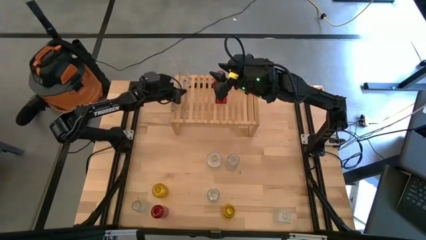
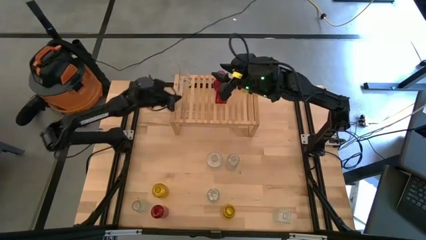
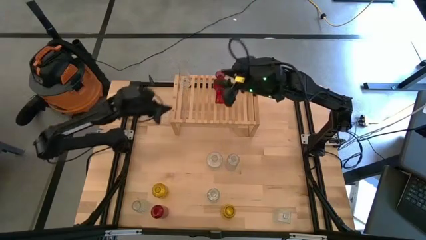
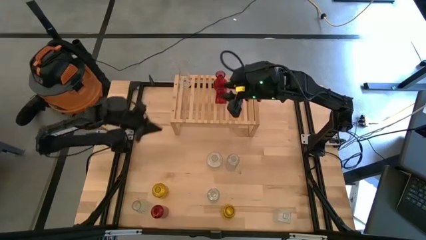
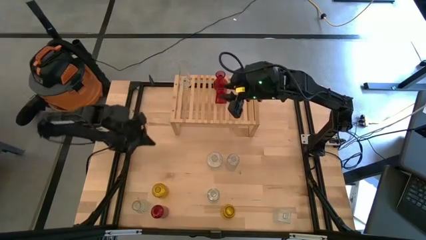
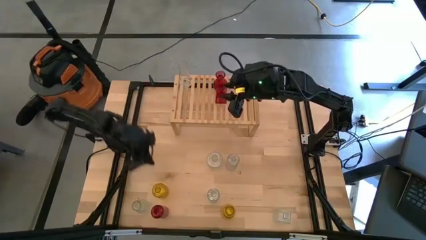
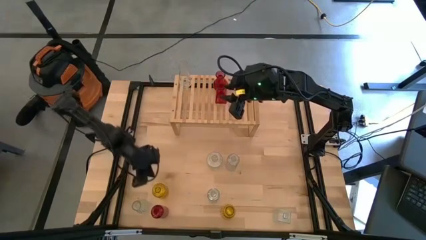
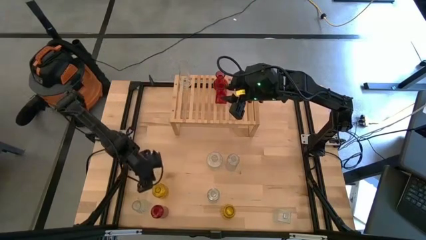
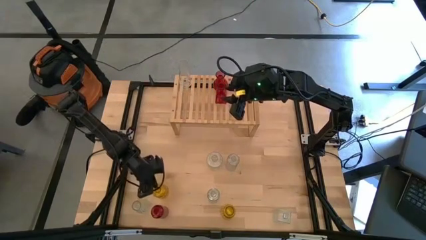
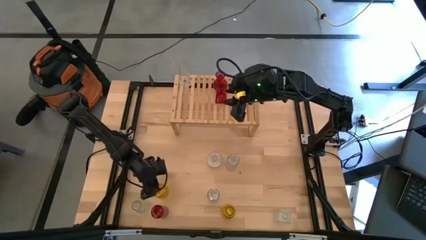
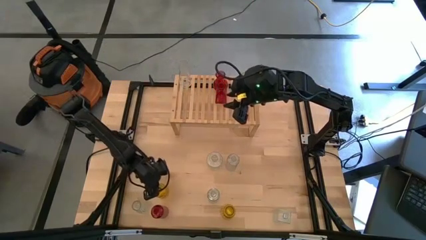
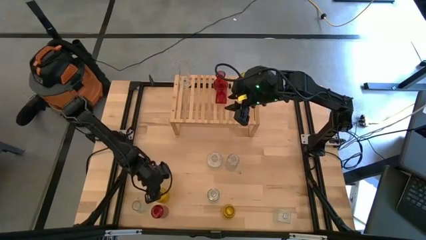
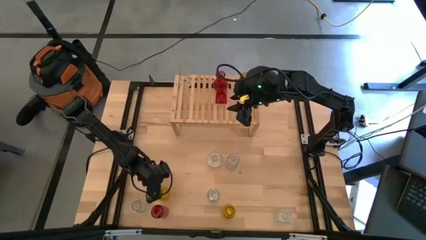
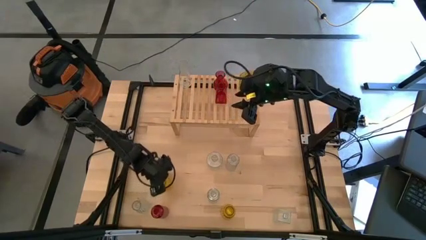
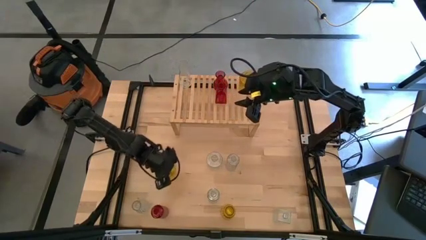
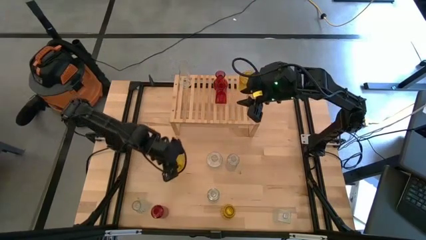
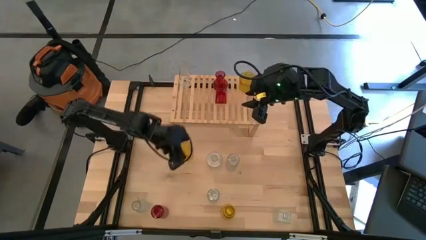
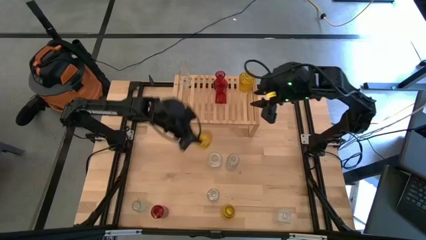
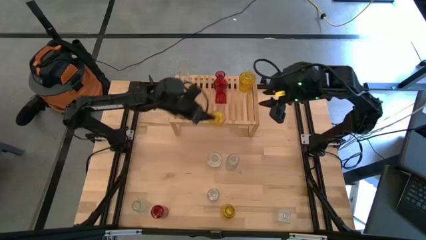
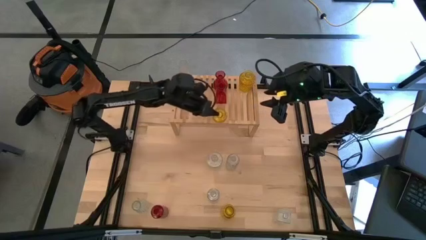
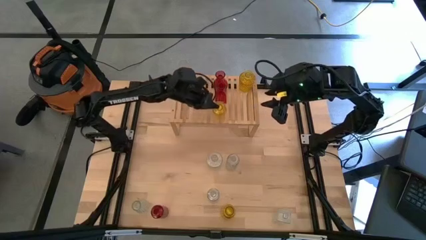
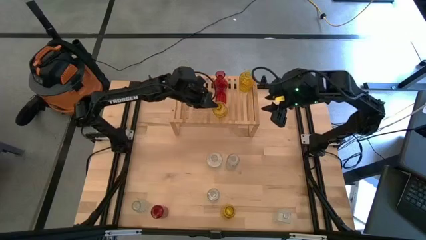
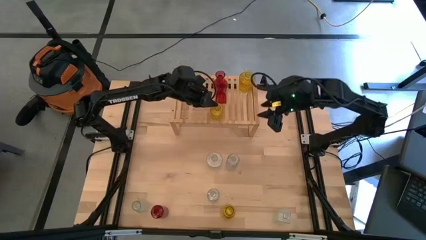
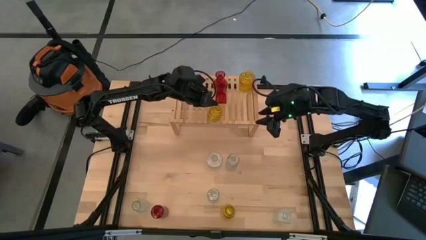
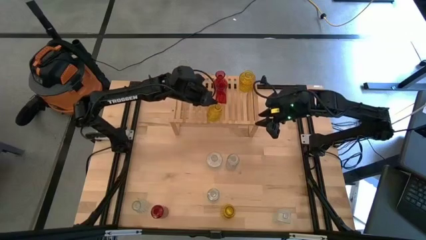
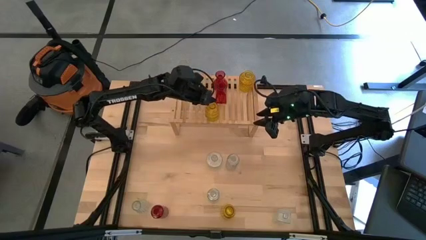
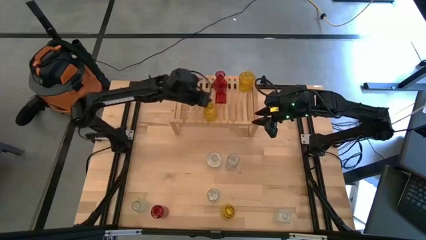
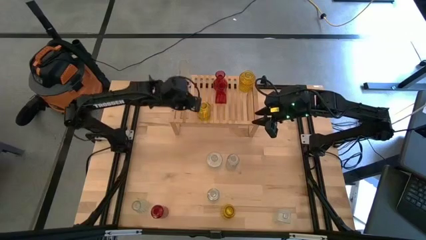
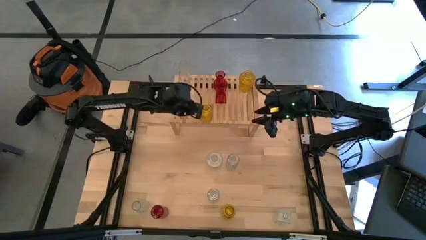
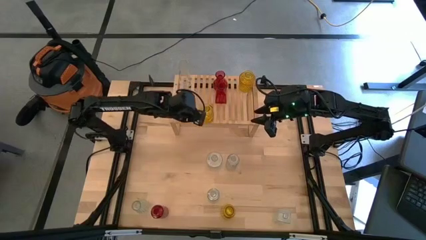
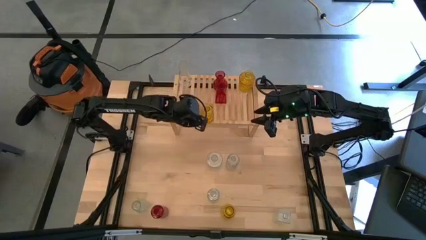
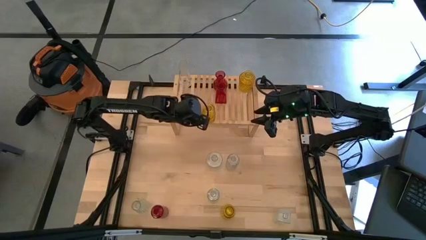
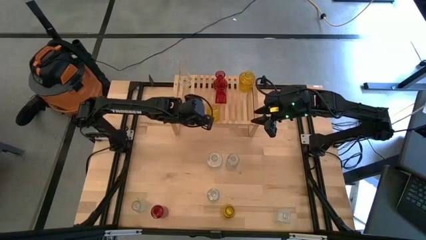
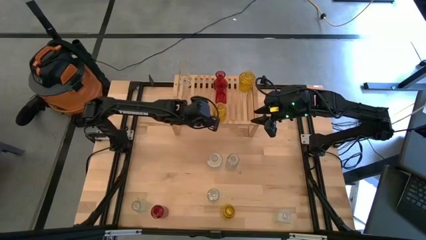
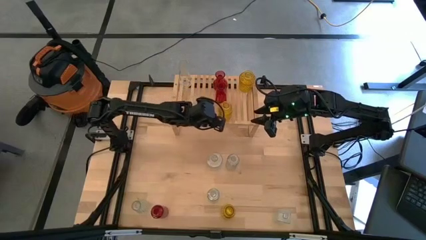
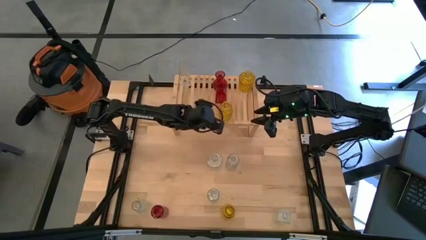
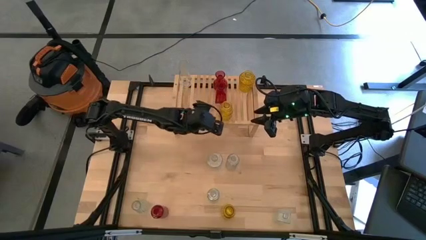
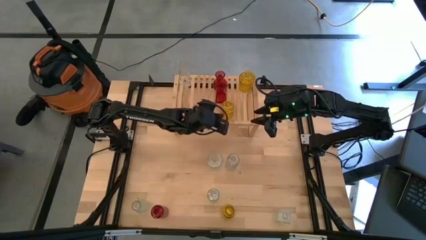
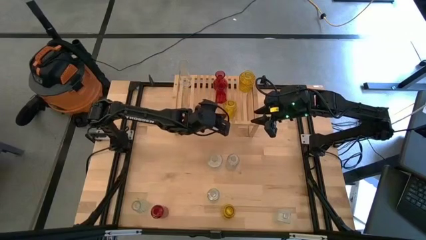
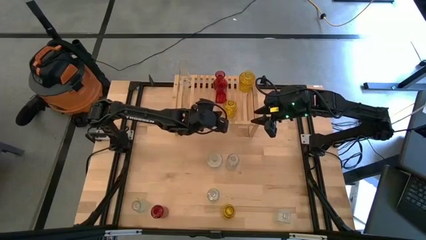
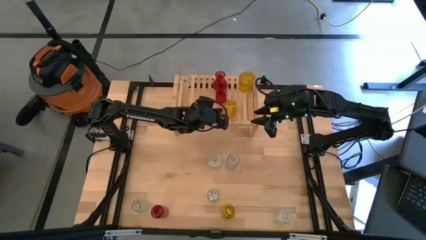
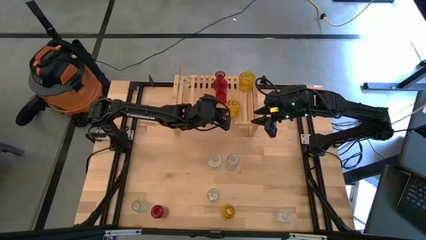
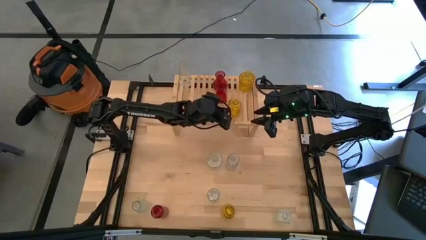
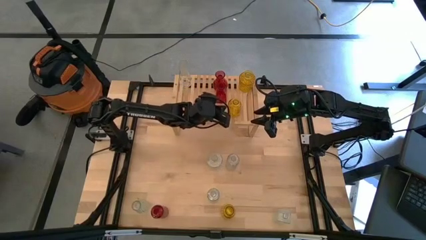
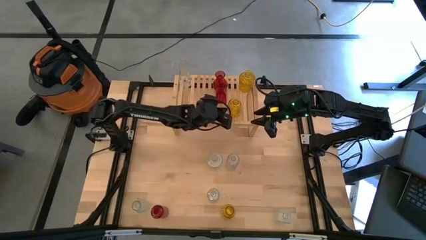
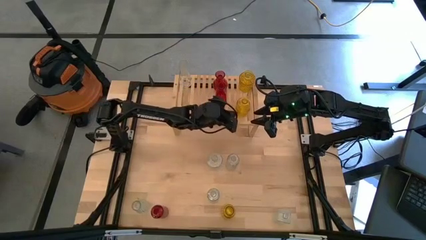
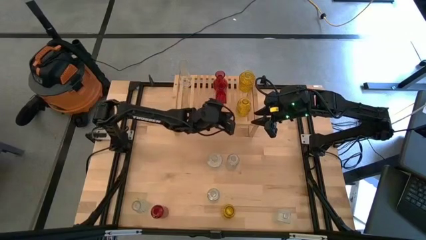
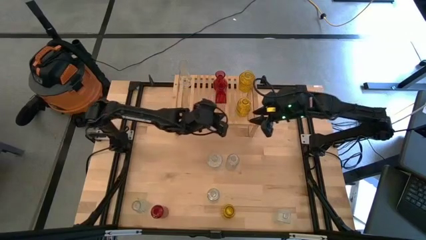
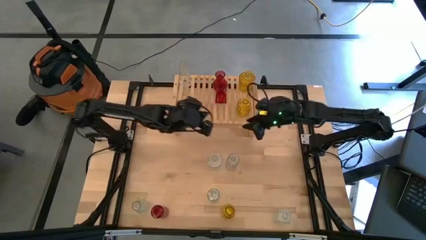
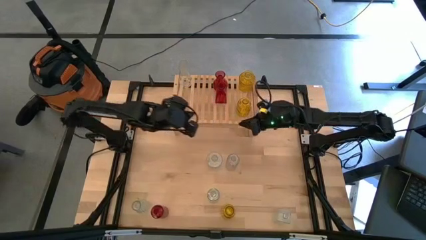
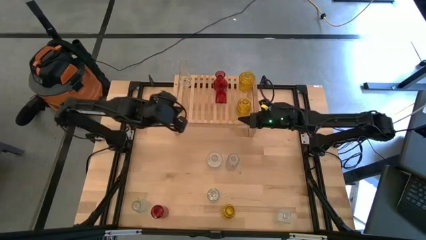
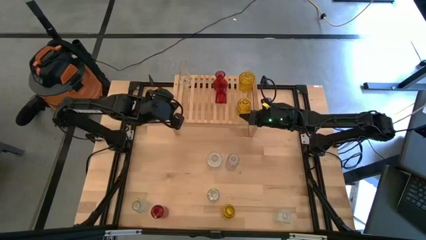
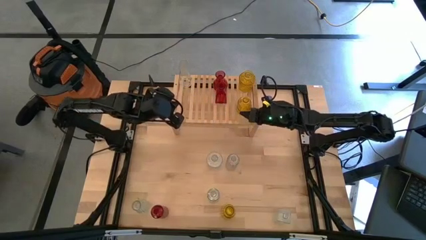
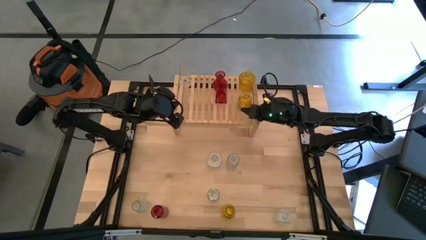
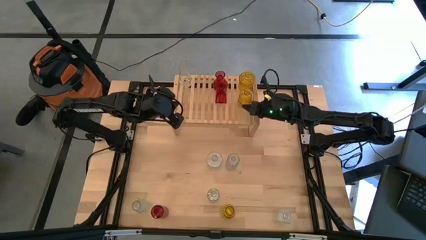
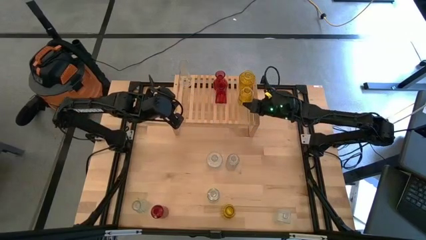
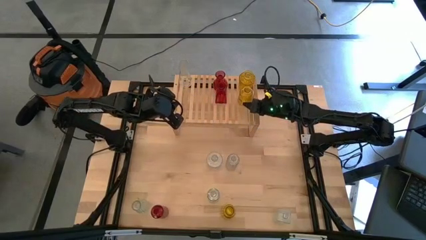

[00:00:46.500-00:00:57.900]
Task: sort vases onto shelf
Put the yellow vase on the shelf align with the other yellow vase

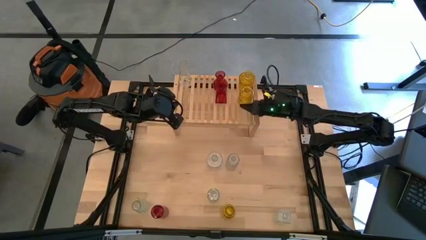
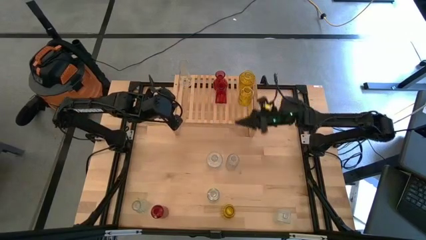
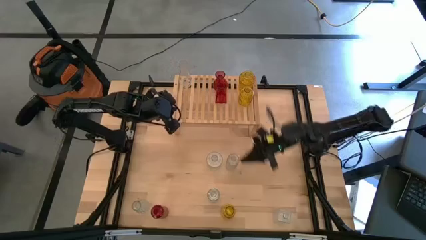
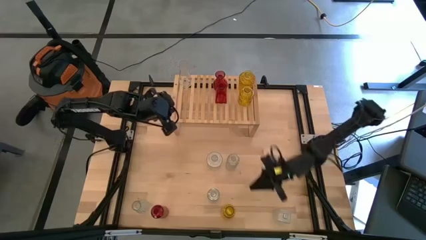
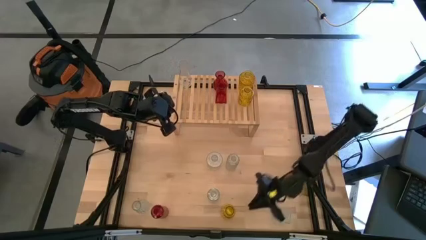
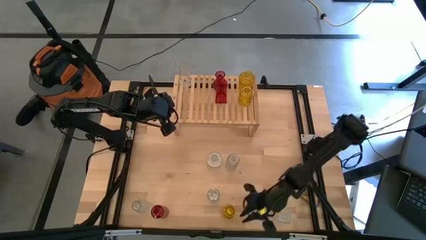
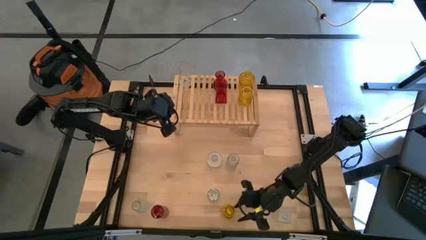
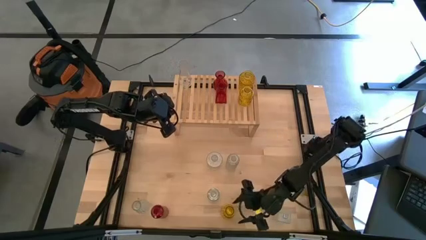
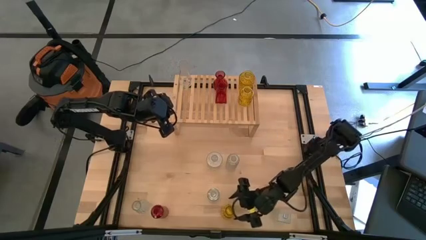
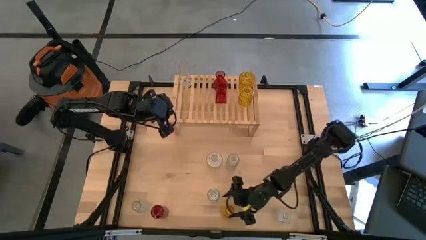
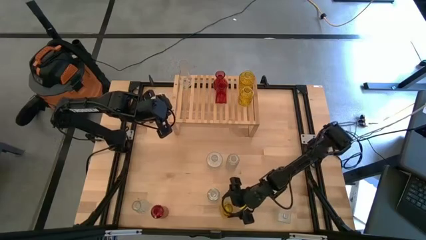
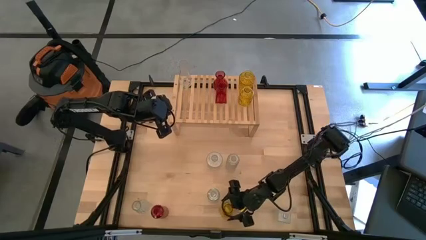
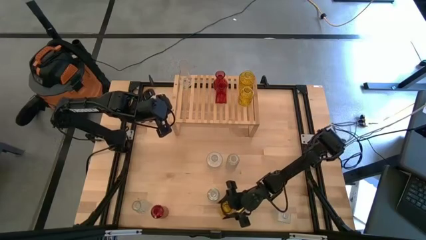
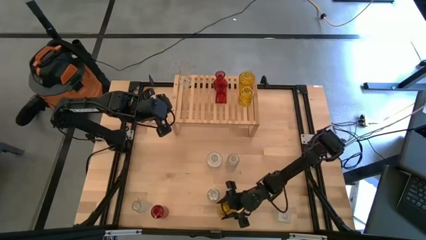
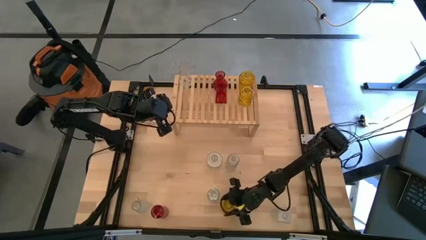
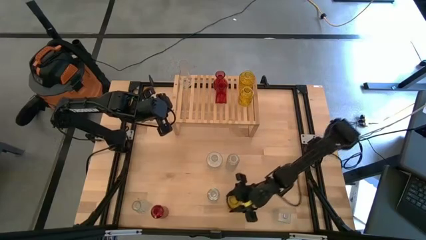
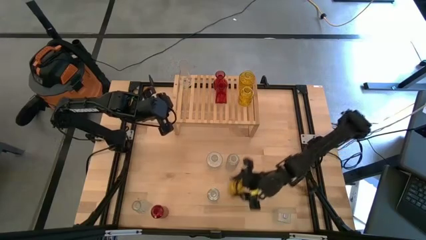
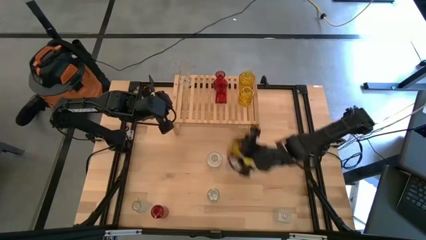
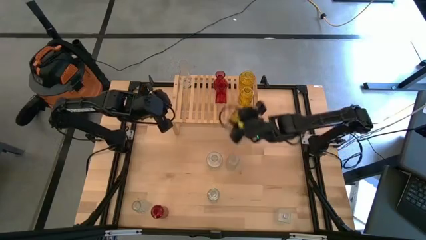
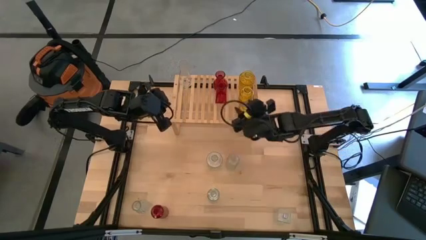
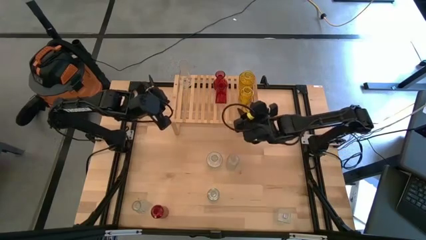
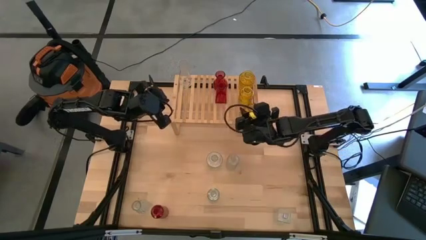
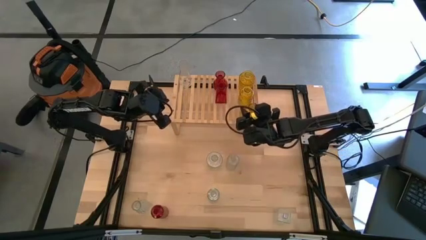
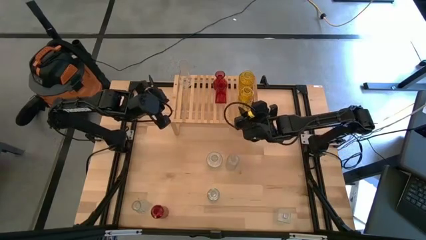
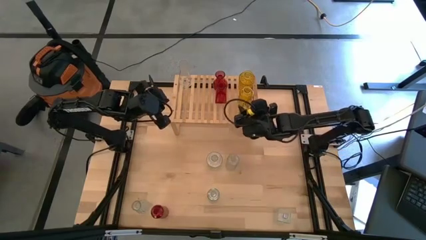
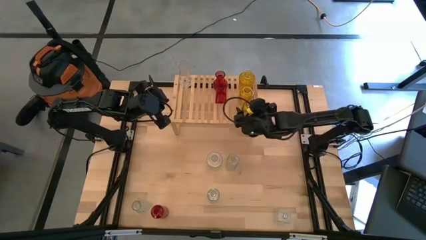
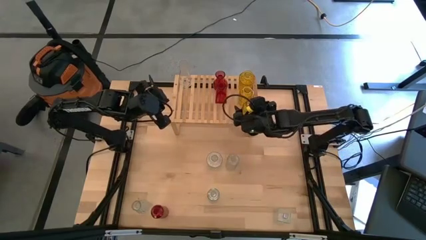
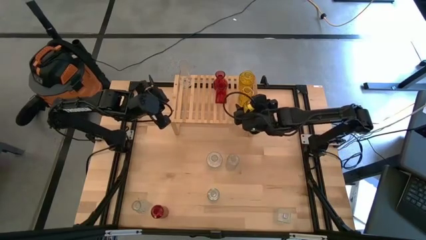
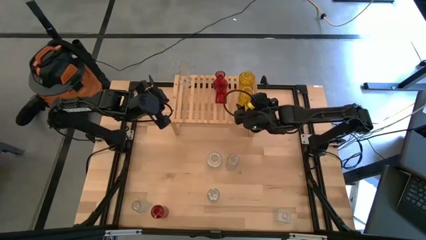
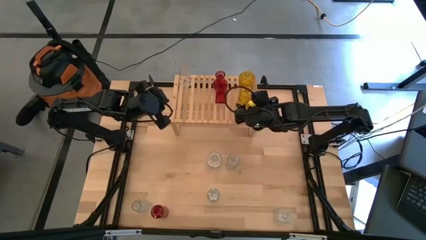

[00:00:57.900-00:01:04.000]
Put the yellow vase on the shelf align with the other yellow vases
